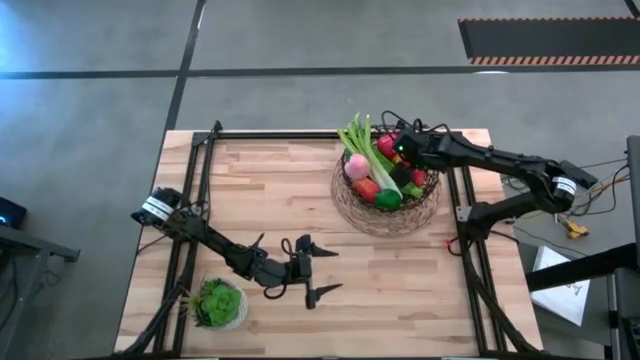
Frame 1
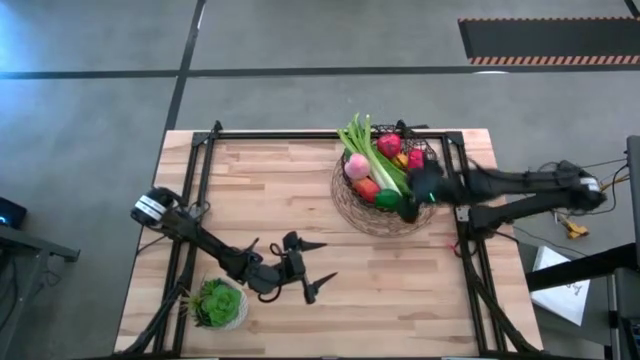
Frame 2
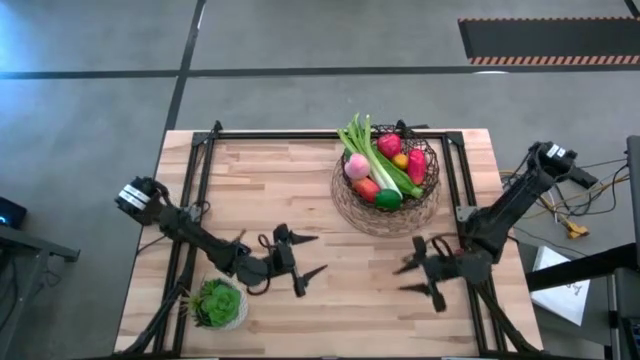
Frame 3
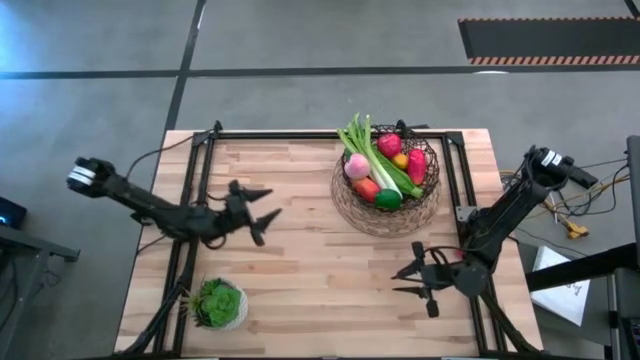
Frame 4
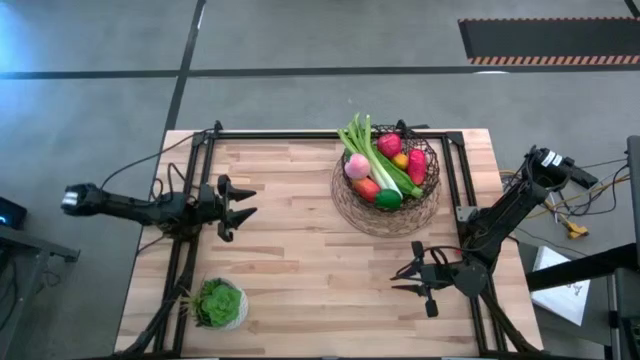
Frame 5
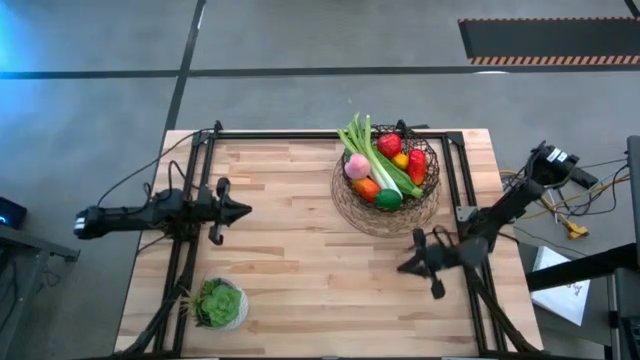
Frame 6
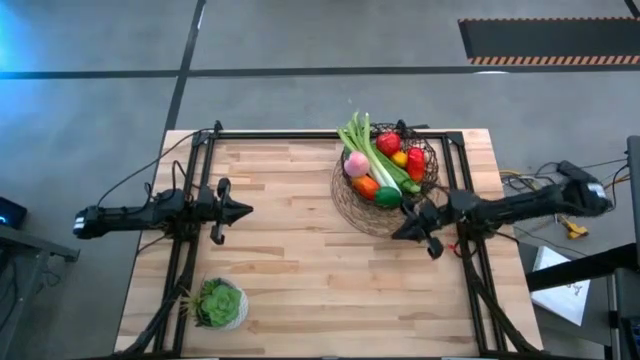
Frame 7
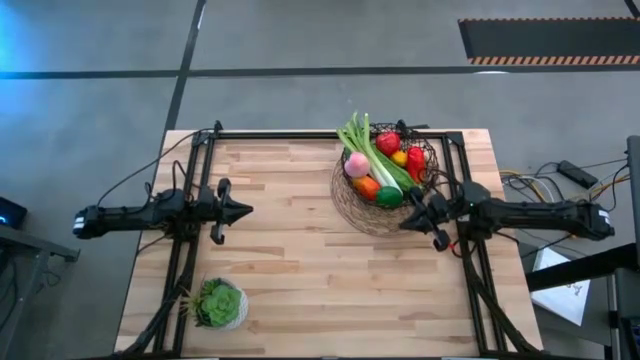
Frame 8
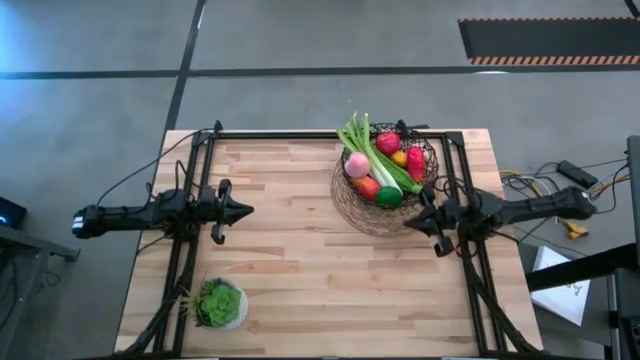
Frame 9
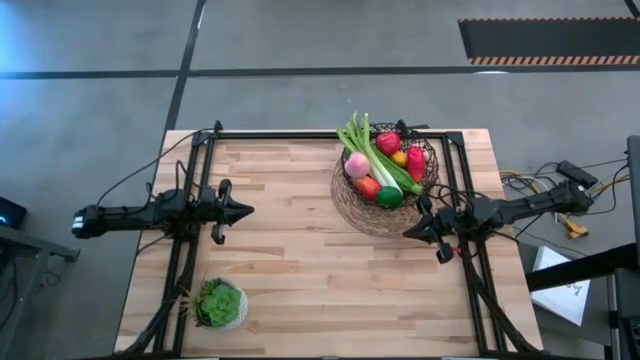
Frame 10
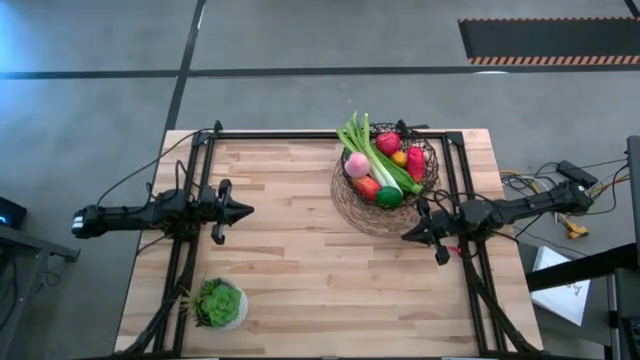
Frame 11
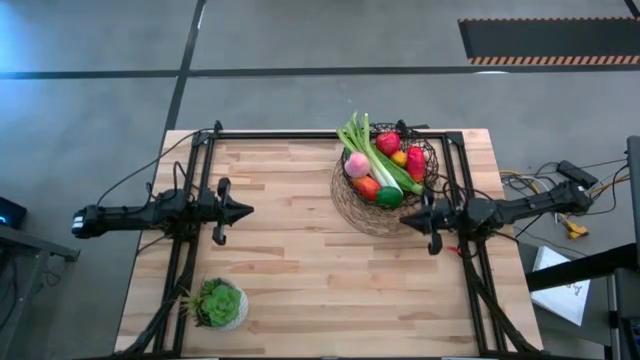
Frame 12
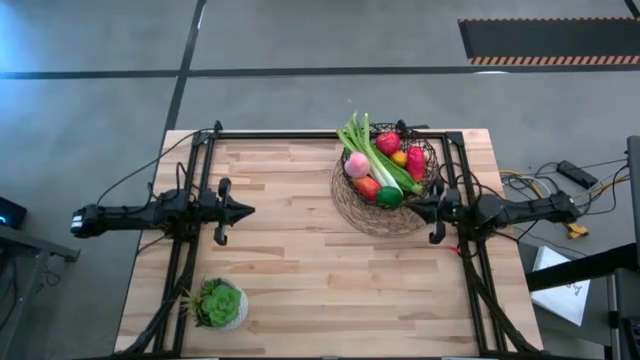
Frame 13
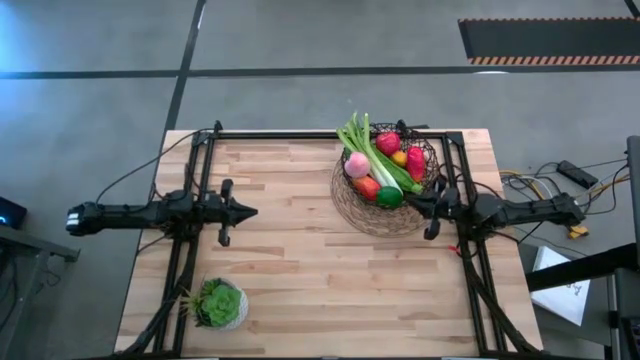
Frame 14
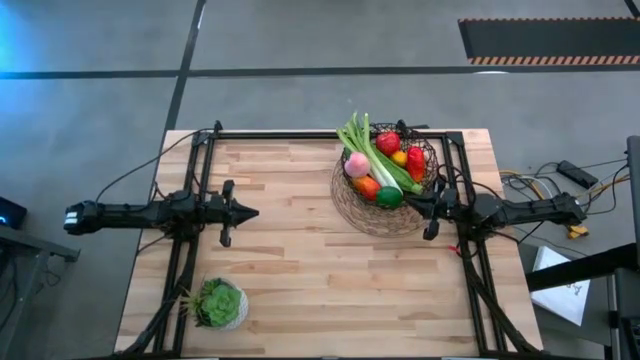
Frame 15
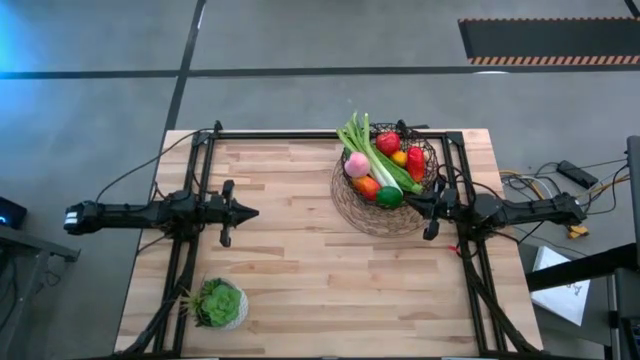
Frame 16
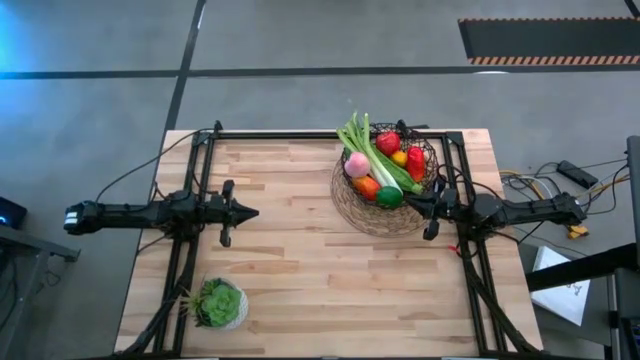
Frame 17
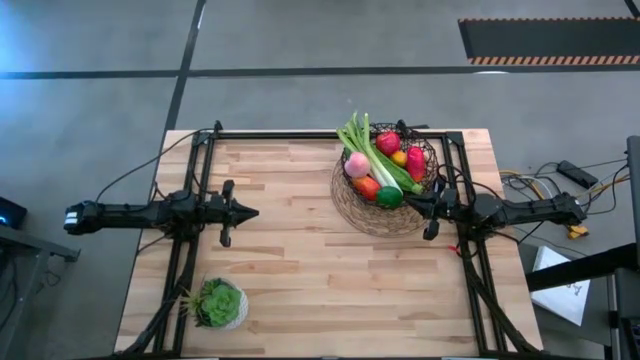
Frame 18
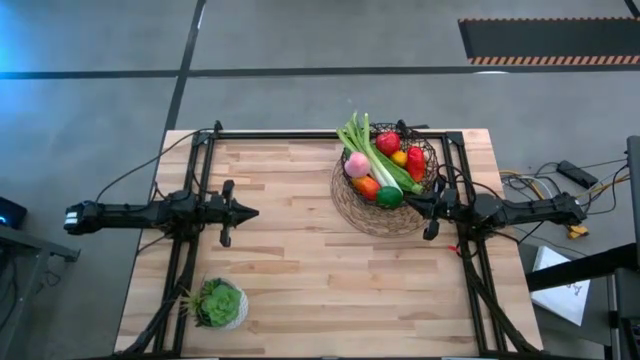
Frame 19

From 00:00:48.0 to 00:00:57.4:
Task: Build produce basket
Return to Home Position

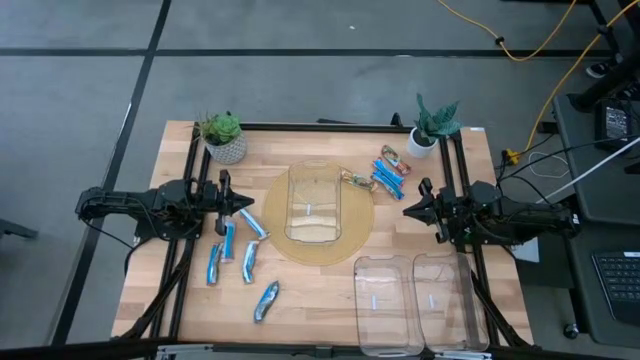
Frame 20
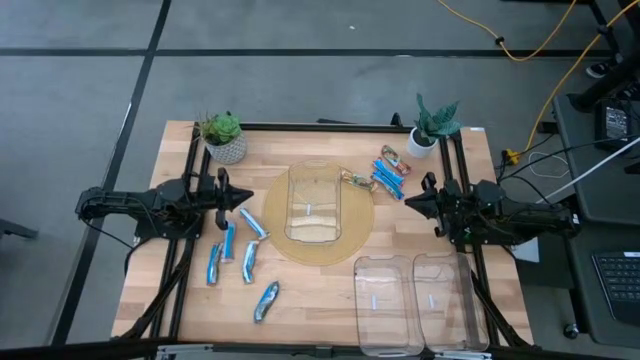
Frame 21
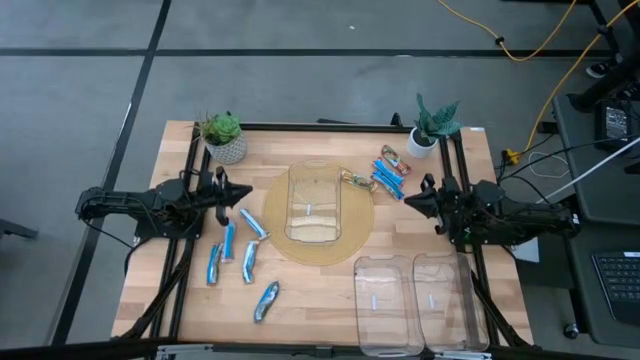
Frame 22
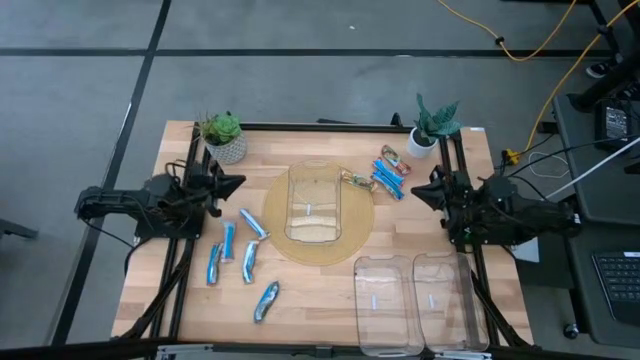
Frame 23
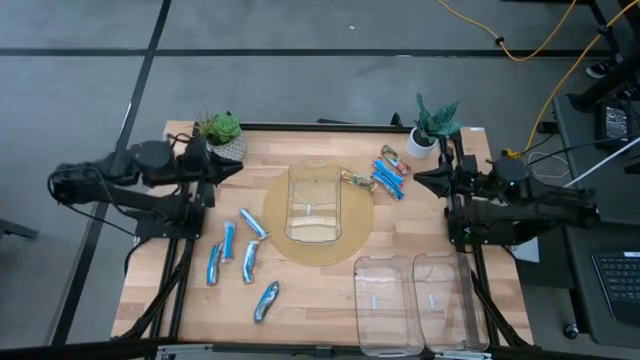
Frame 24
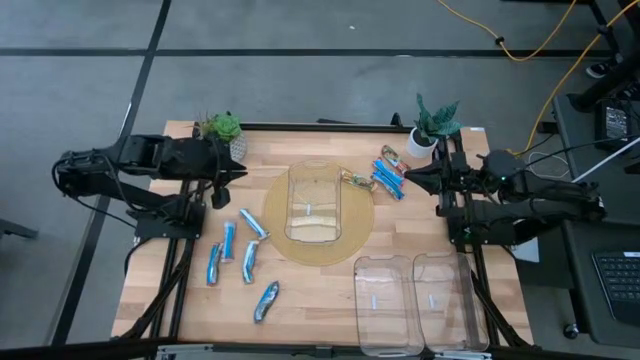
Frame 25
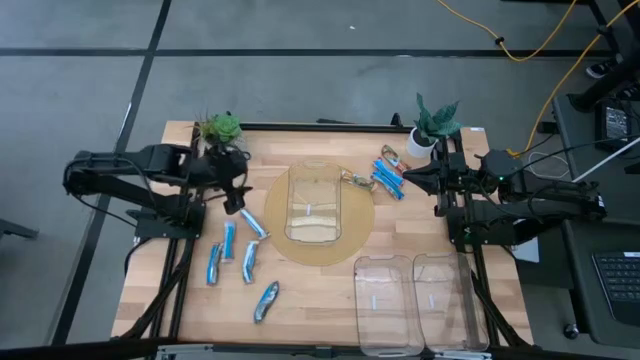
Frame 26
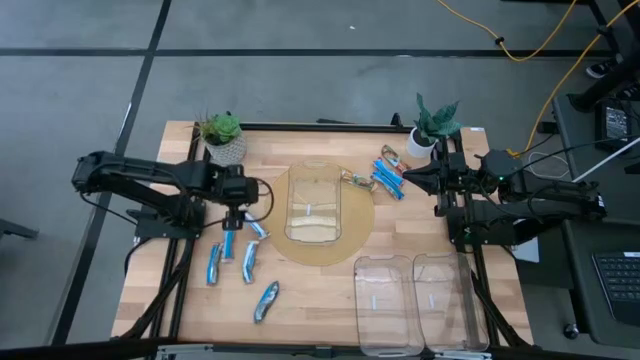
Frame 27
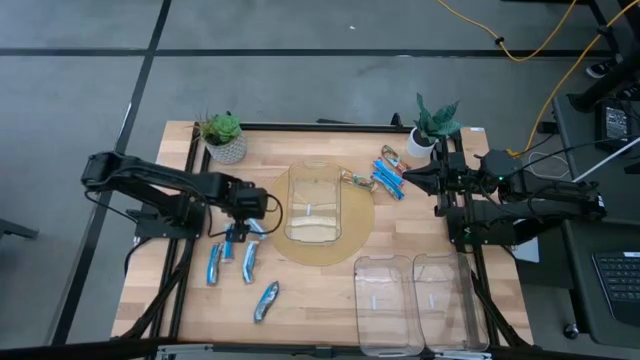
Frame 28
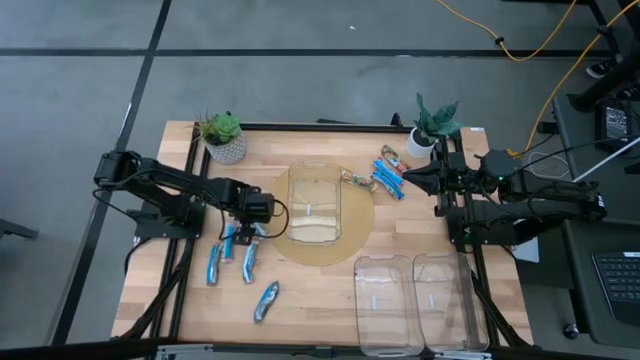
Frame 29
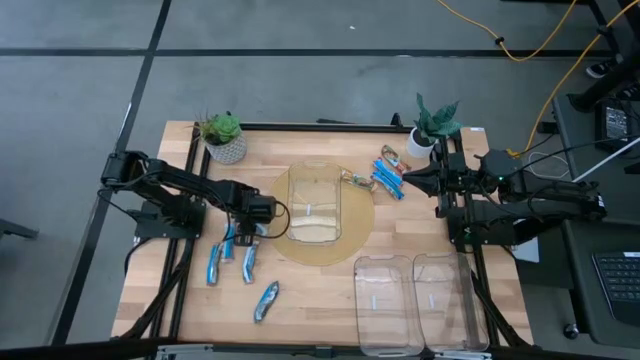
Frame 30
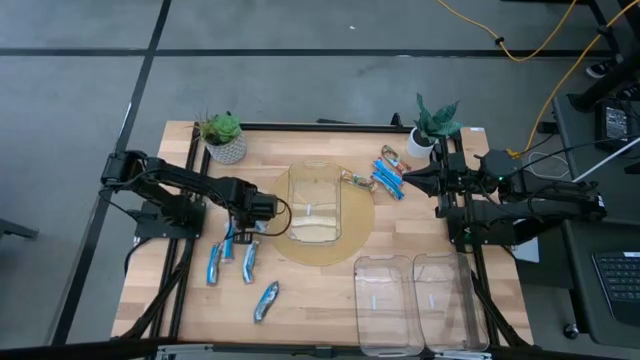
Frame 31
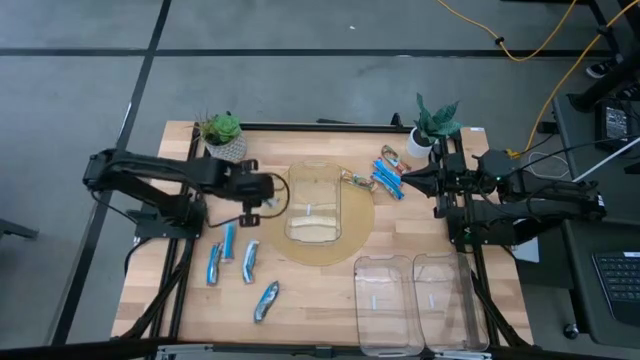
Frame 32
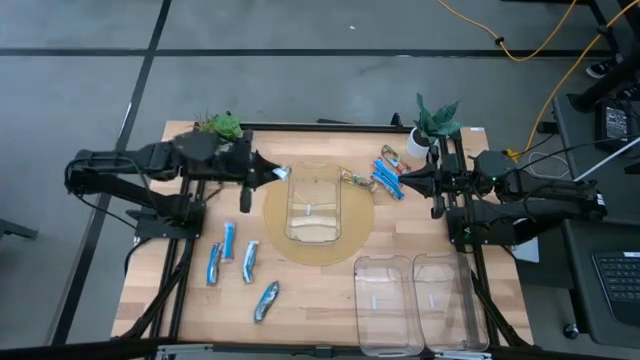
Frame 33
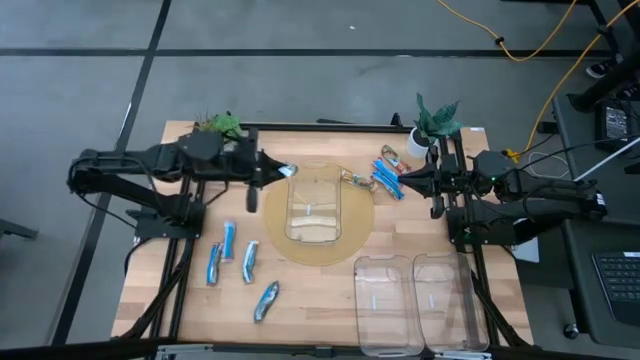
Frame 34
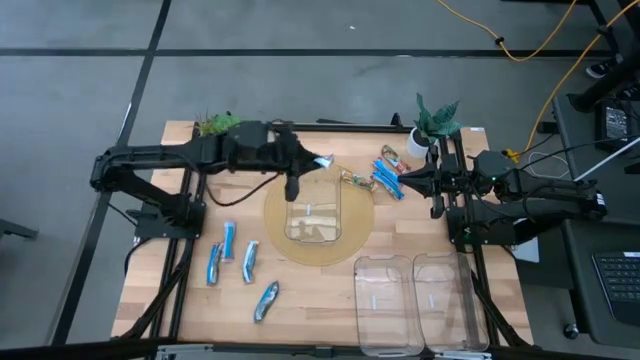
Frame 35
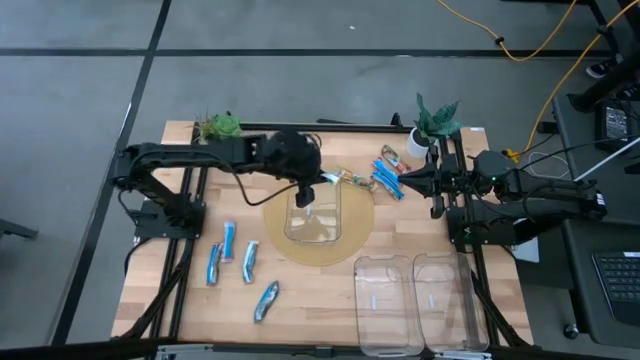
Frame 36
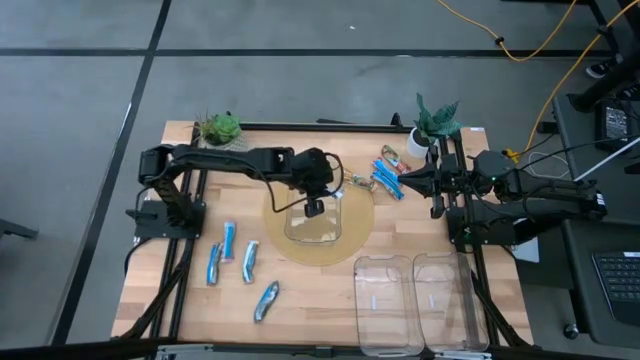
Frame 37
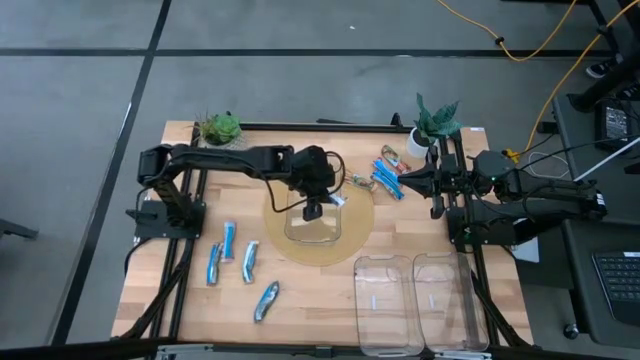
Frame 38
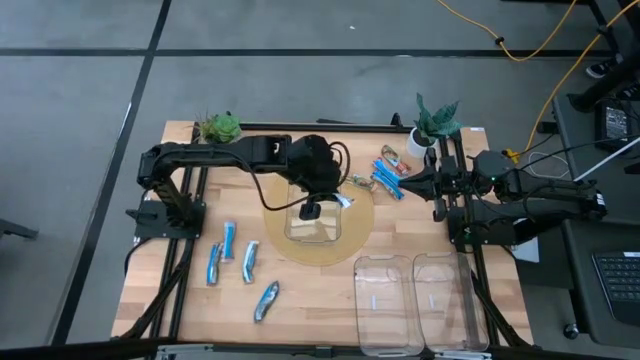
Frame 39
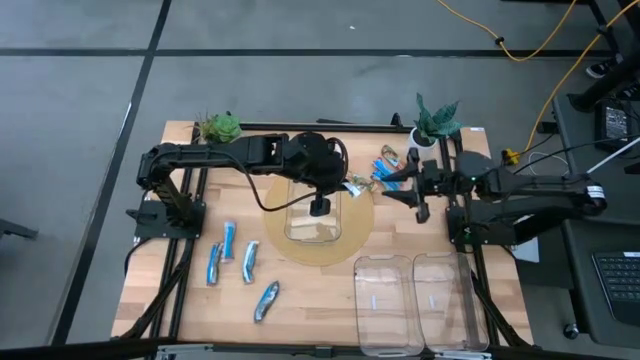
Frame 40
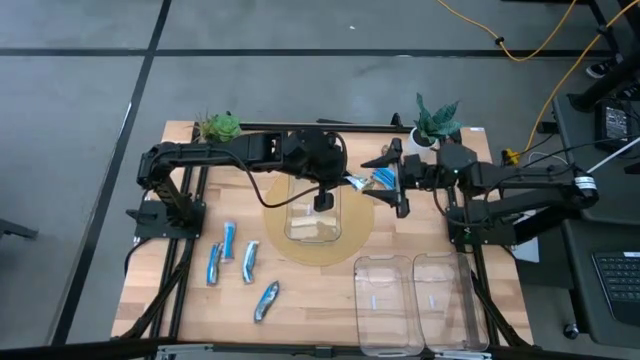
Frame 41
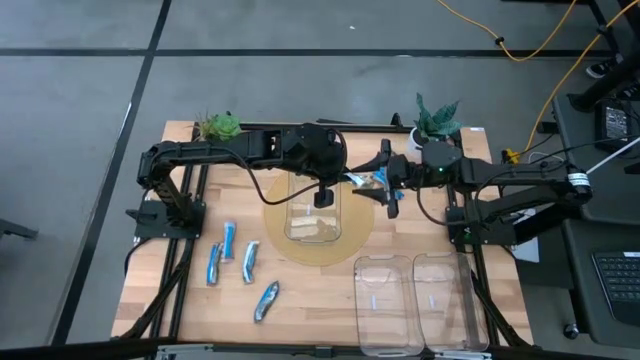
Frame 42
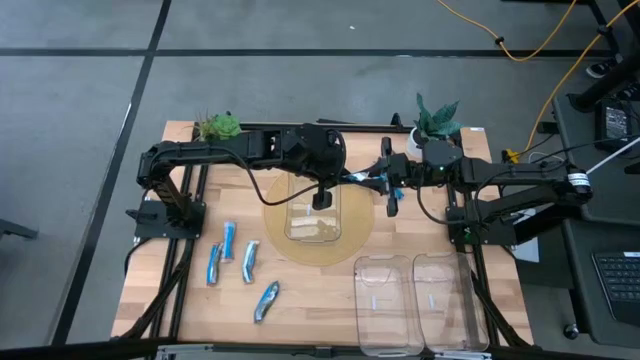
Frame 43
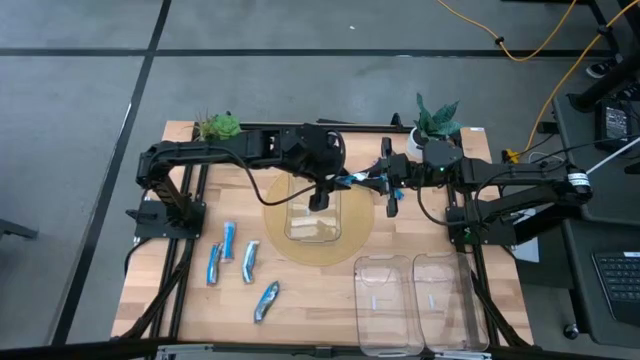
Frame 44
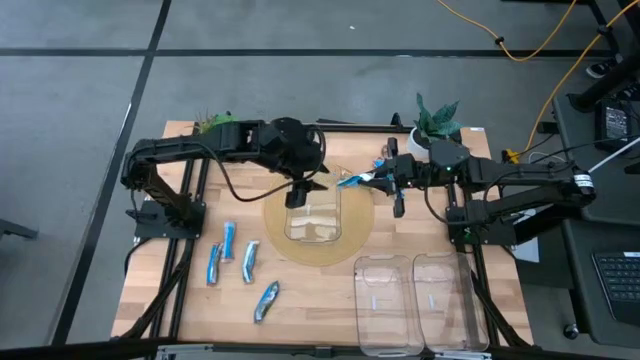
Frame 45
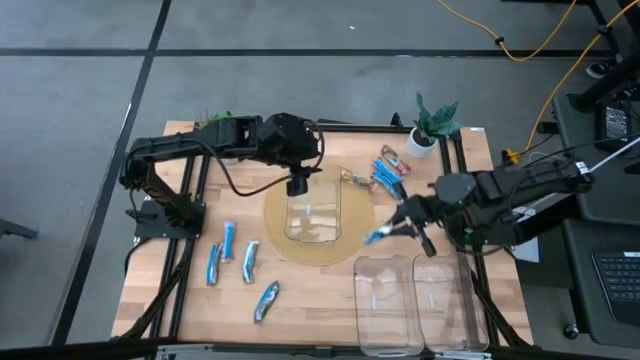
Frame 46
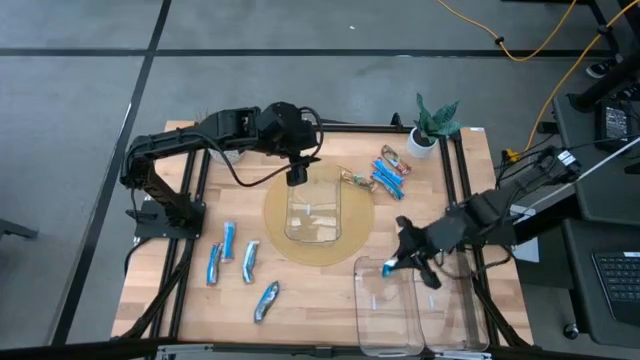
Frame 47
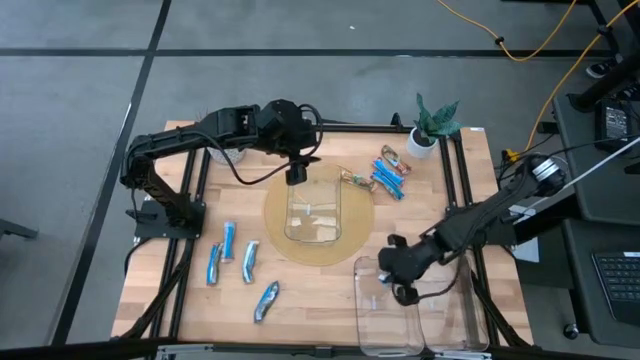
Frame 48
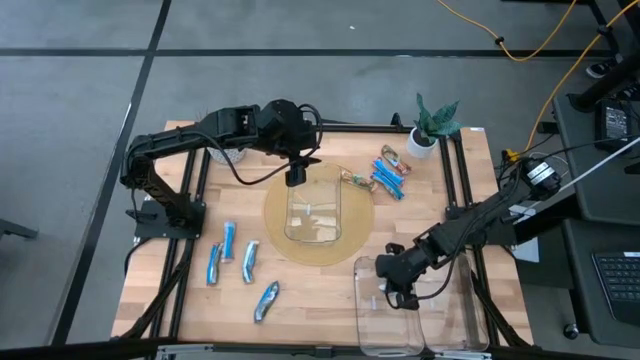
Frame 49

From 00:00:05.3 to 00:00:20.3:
Task: Pick and place Granola Bars by type
Put the yellow granola bar pack into the bottom left transparent bin
